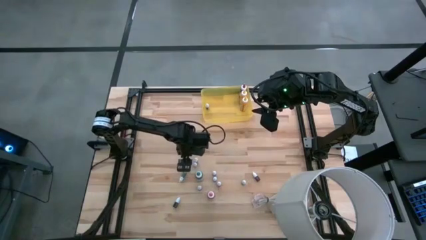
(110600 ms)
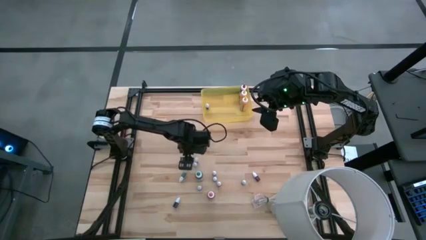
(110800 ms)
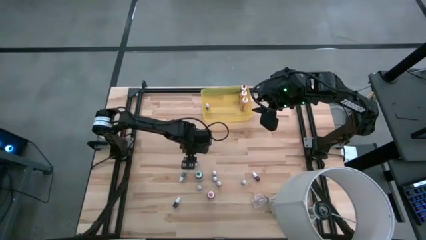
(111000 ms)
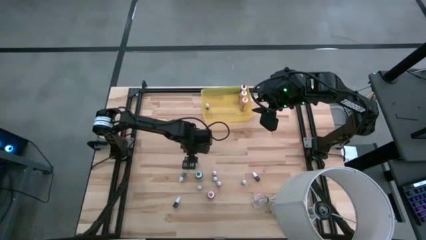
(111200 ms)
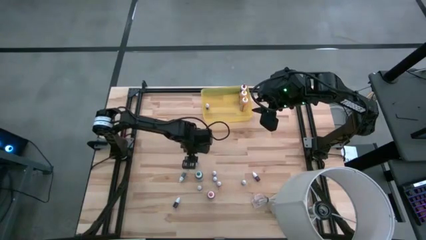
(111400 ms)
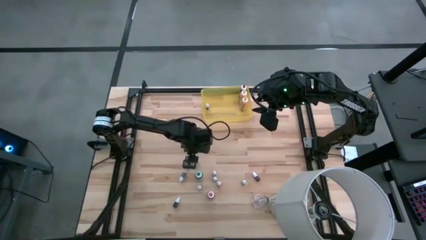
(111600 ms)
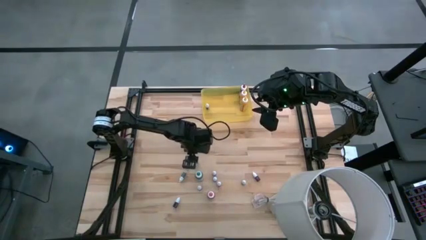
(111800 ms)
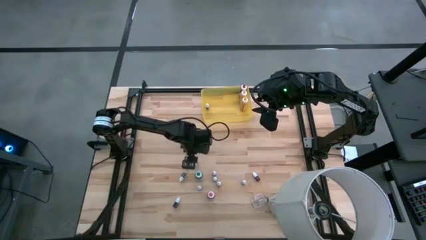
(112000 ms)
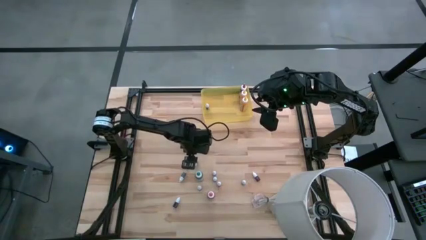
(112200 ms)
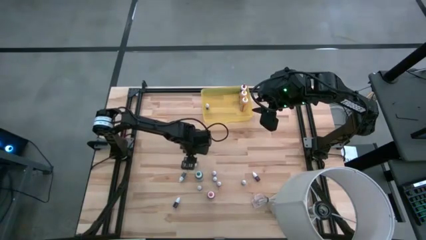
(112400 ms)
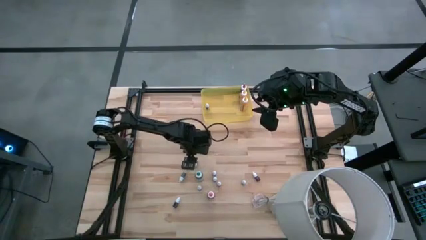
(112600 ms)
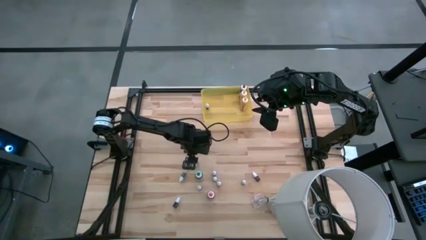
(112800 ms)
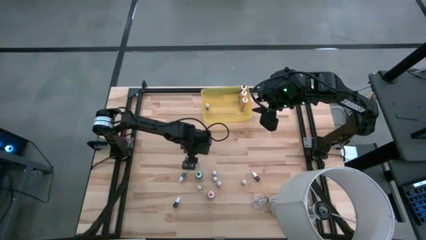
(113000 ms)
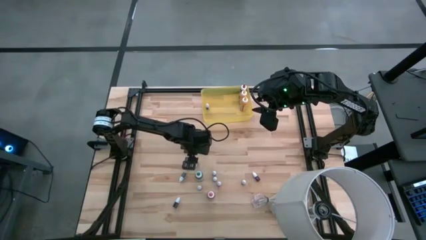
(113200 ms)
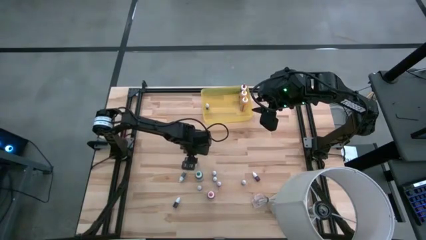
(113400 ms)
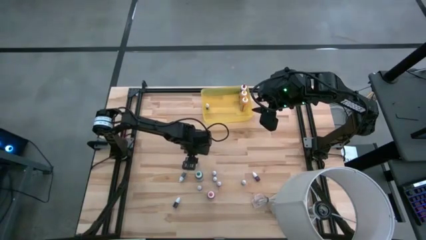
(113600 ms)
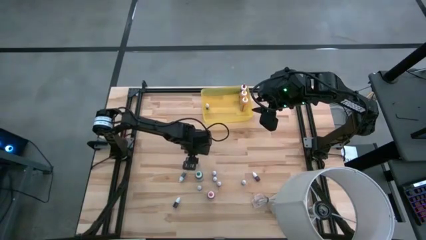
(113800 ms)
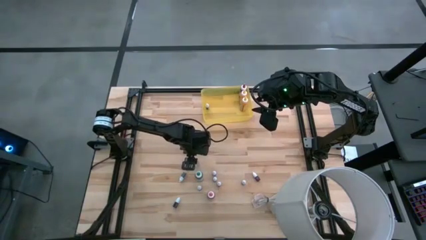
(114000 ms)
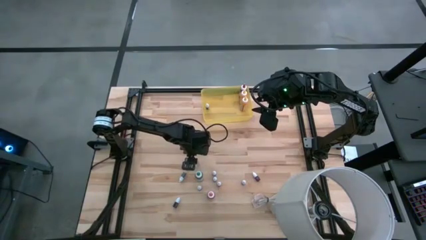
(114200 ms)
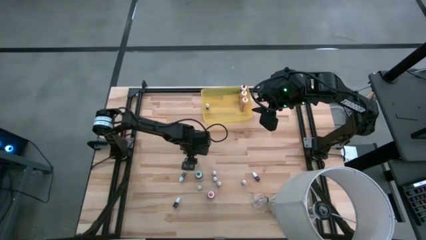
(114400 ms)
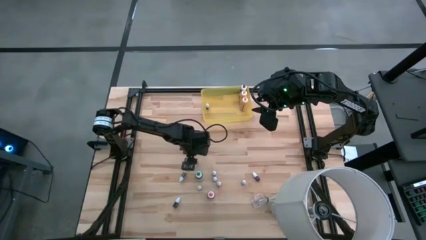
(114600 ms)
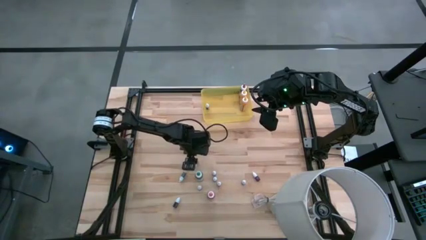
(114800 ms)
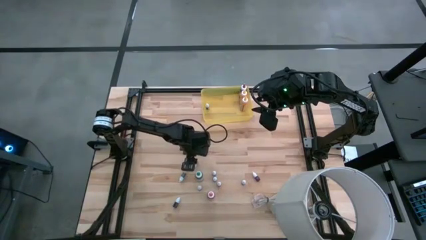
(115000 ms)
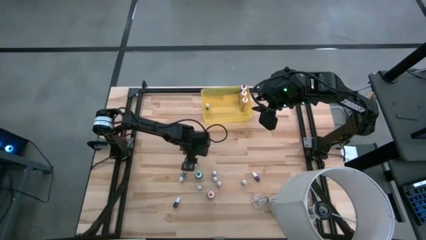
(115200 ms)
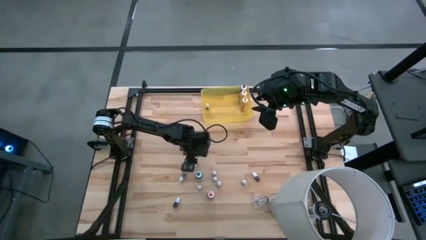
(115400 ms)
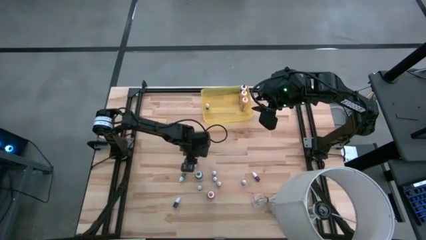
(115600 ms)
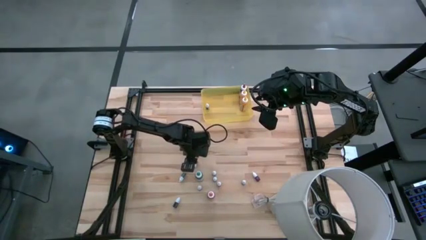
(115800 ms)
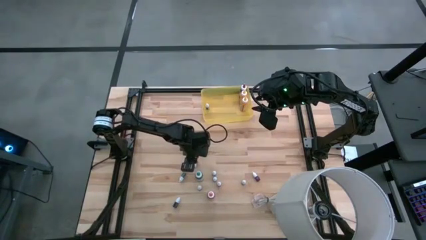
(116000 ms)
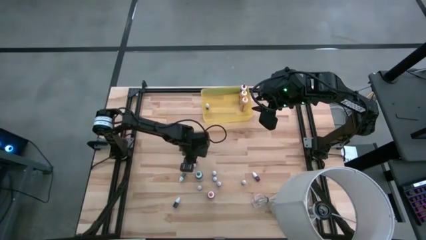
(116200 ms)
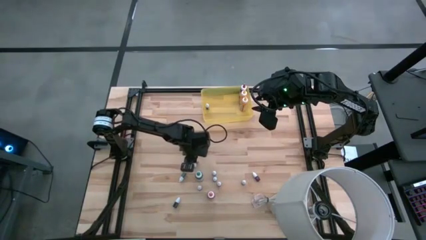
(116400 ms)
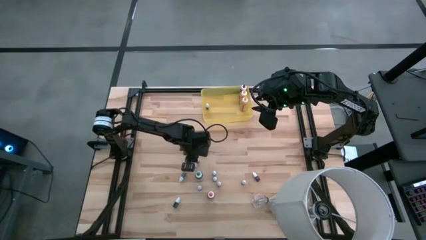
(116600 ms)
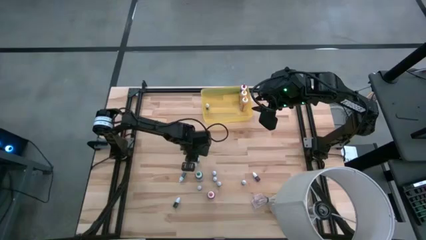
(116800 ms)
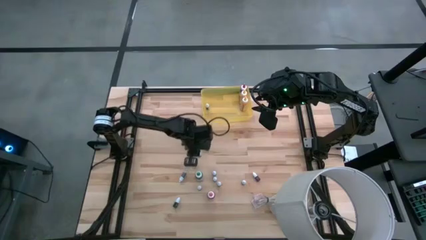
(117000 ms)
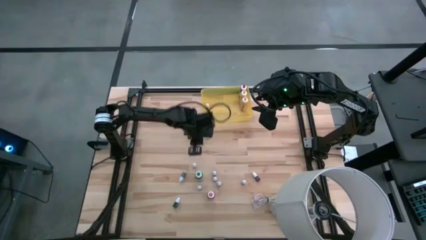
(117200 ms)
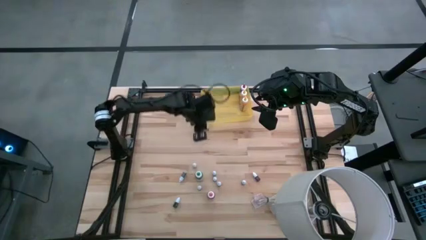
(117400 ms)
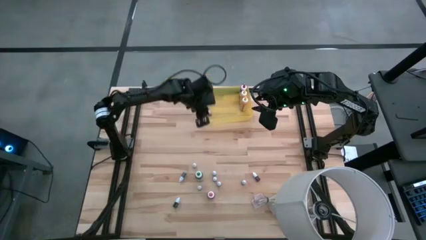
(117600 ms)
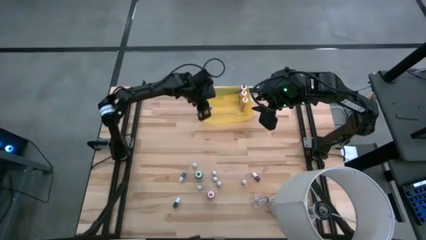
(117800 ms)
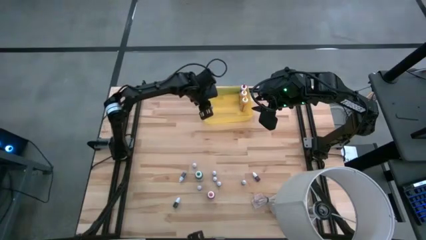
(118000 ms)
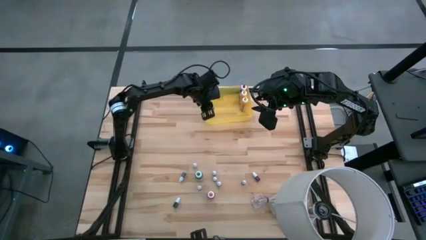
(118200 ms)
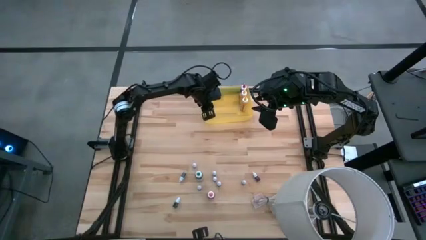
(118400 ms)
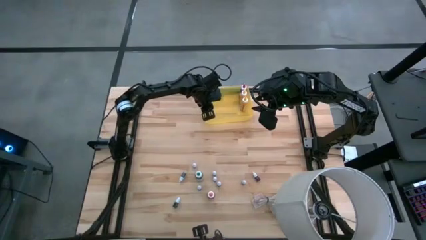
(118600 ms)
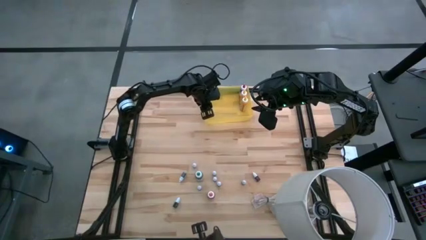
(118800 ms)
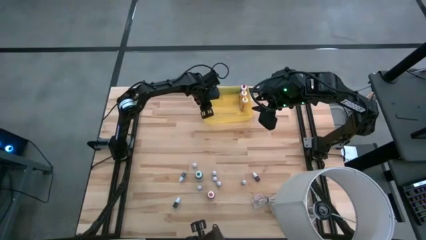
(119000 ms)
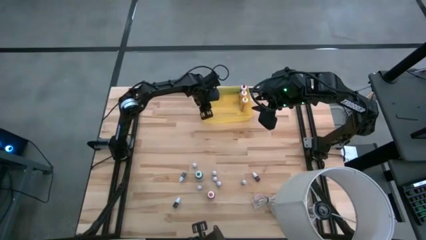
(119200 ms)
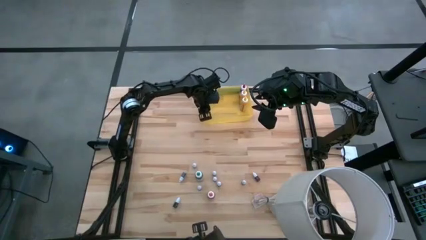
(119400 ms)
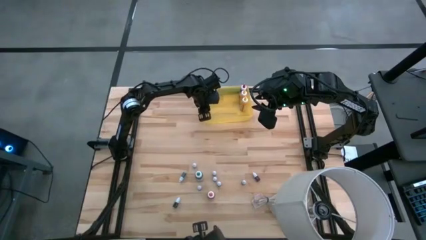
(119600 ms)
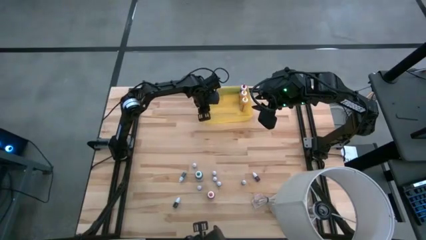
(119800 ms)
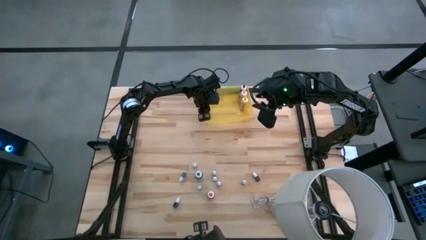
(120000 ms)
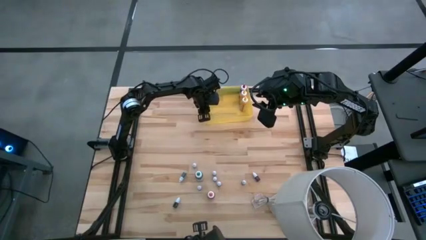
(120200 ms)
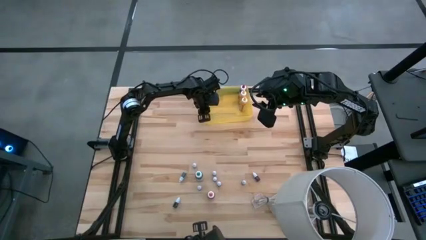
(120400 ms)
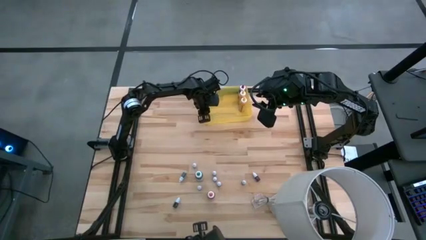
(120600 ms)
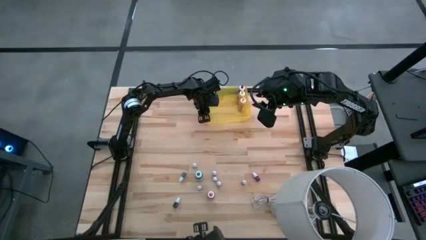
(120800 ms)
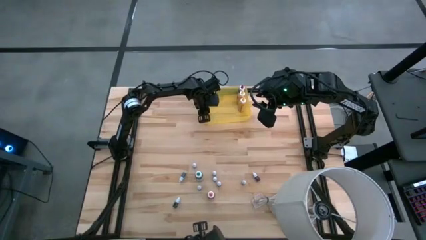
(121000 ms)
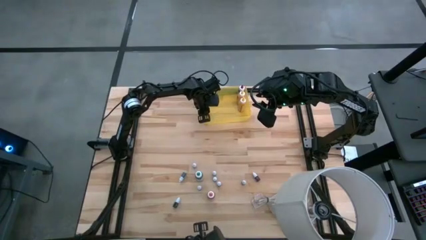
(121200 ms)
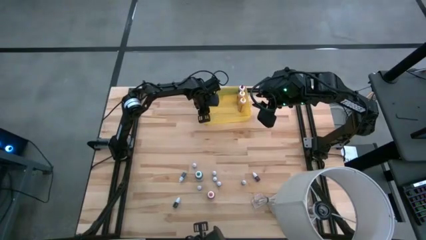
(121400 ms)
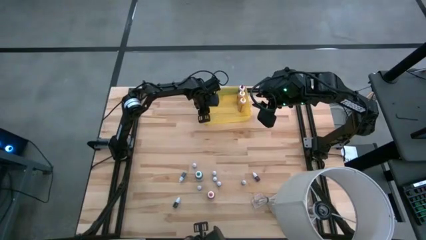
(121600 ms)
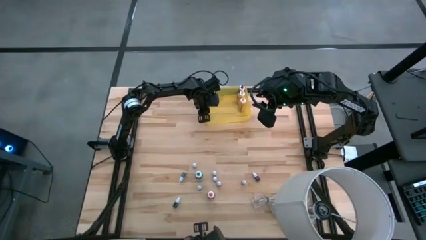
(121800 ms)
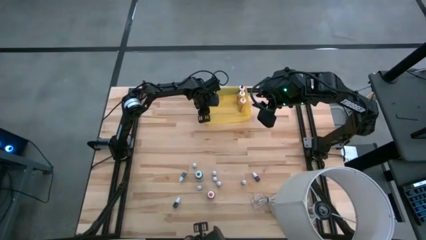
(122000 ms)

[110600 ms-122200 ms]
Task: Pick & Place food coloring
Put the top small violet food coloring bottle into the yellow bin
